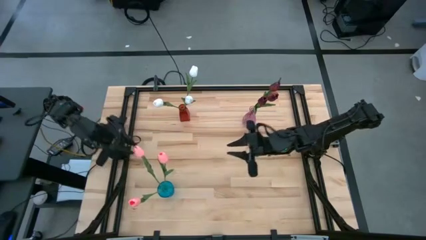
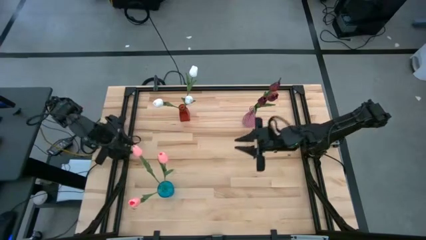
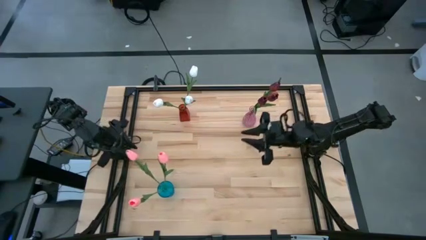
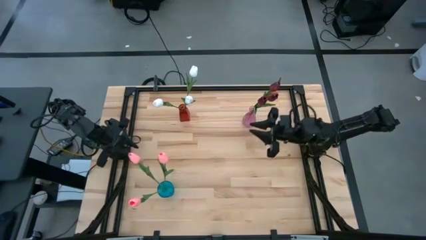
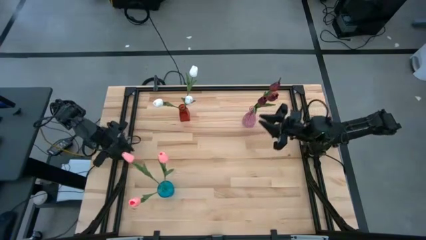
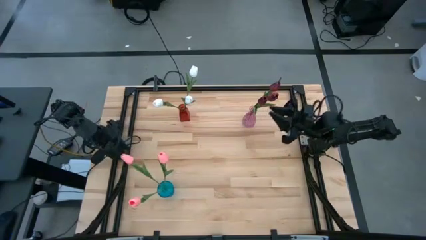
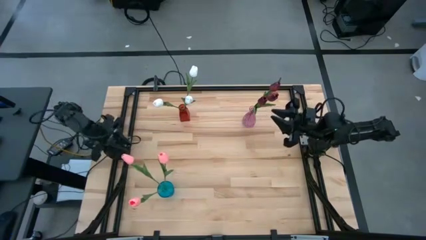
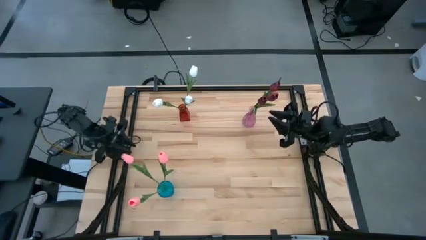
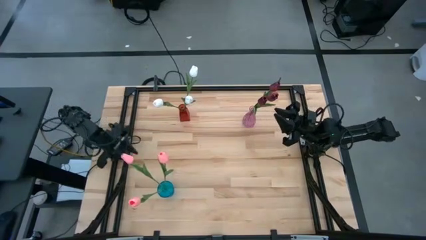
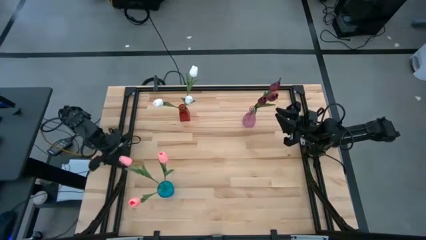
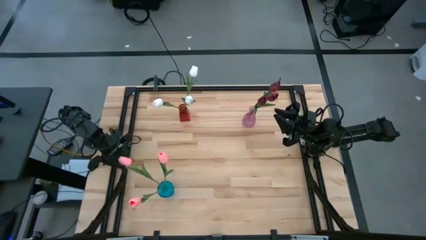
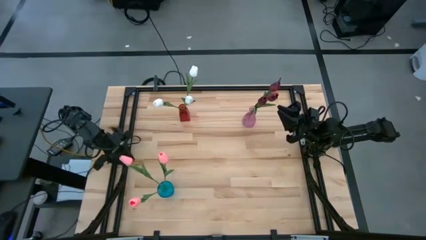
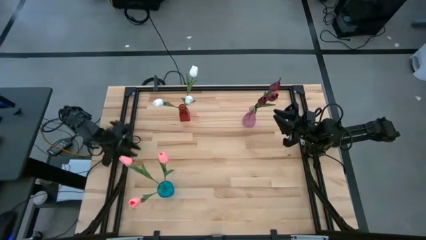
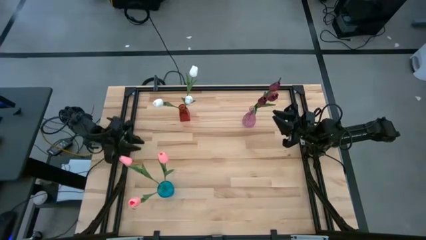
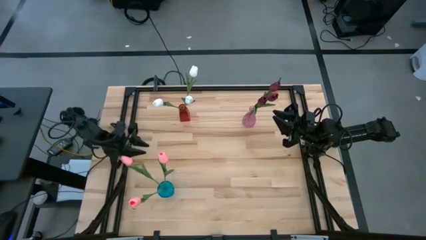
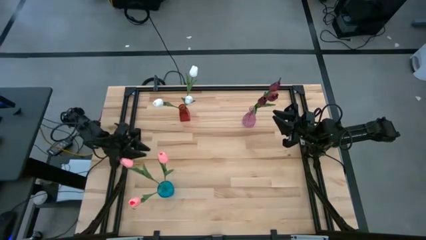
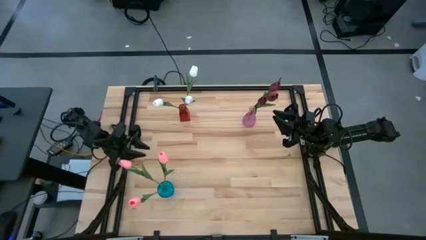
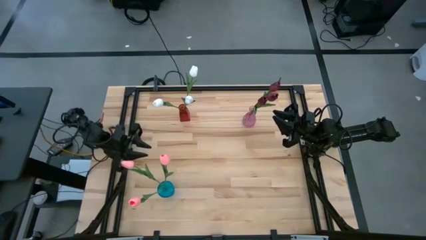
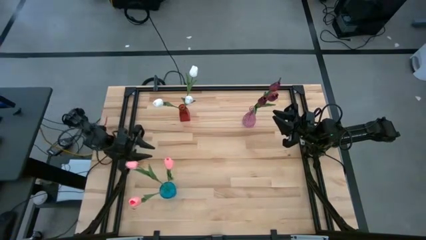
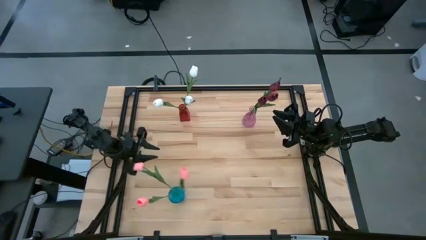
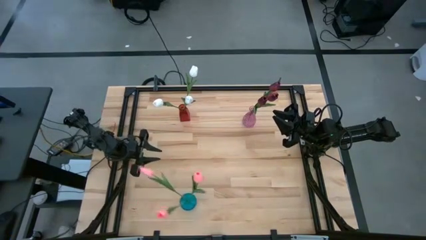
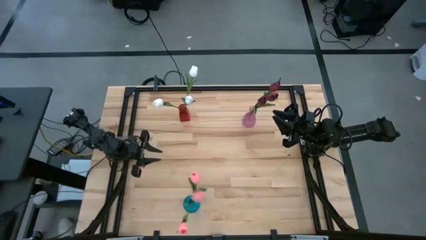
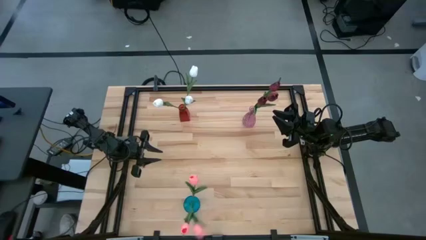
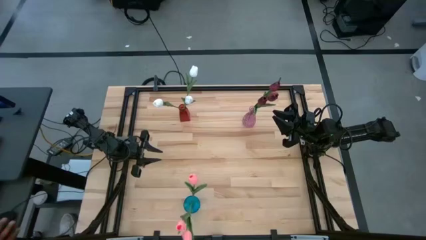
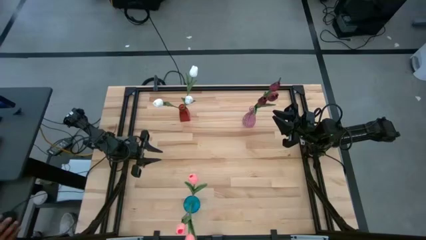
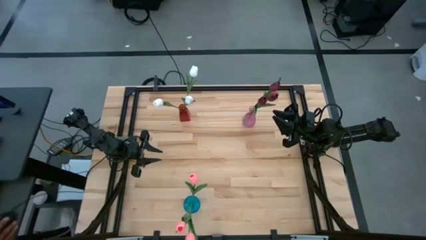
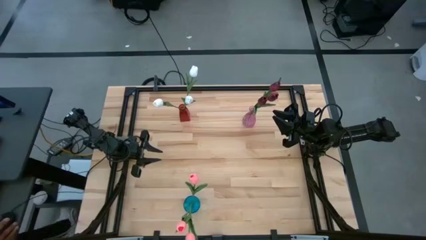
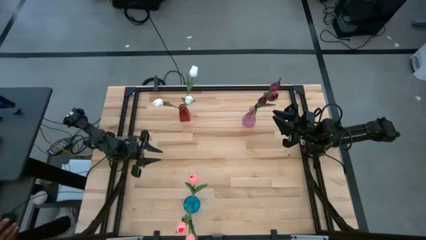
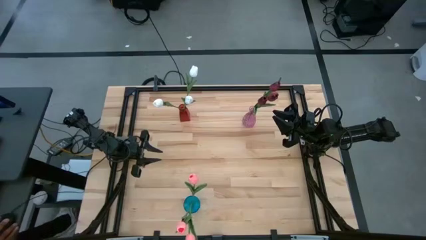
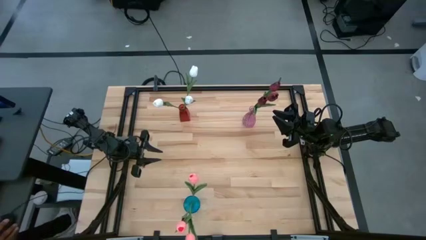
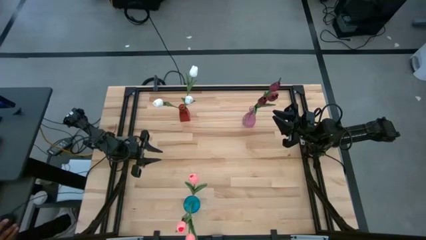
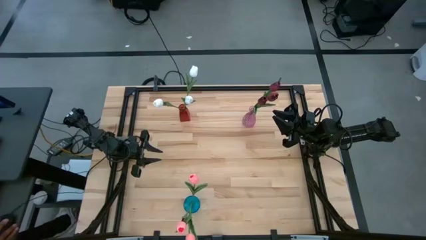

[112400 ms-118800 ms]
Task: Sort flowers into vase by color
Return to Home Position

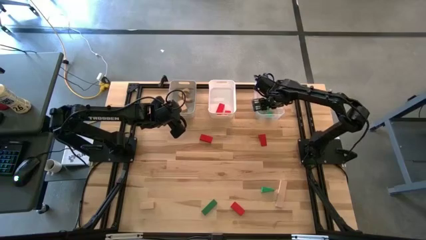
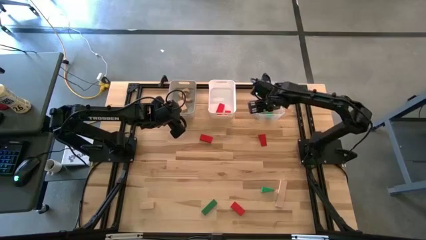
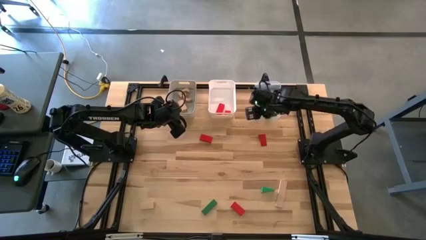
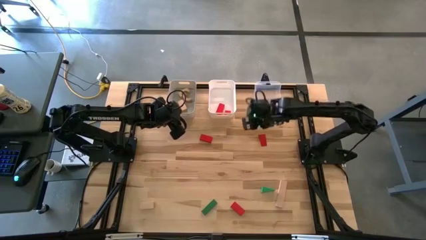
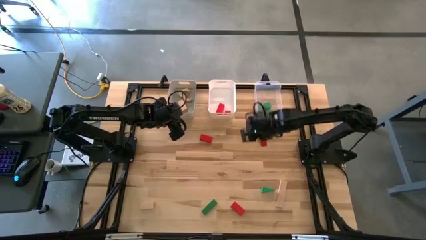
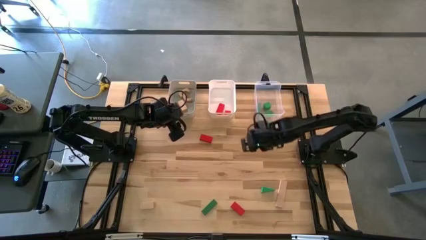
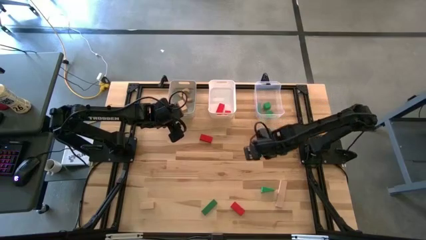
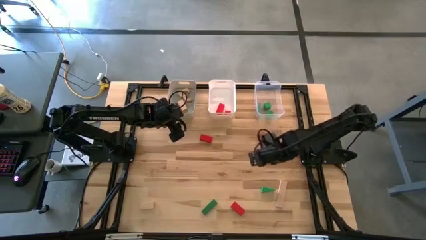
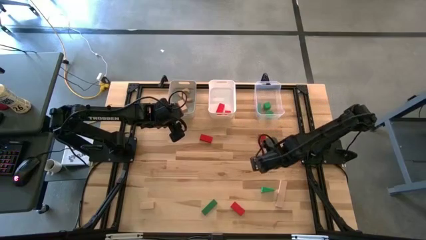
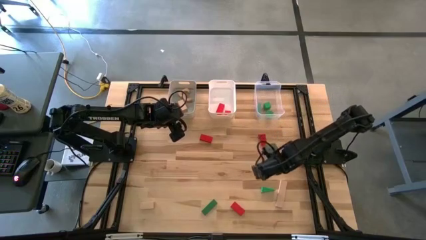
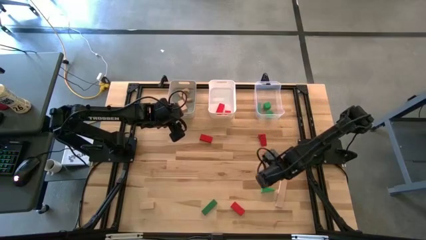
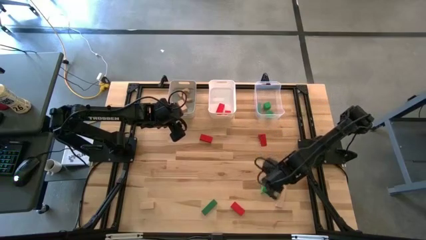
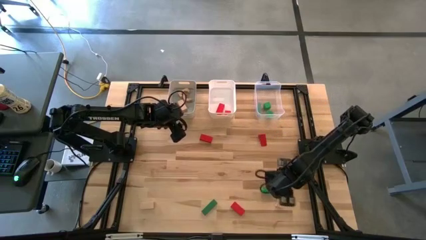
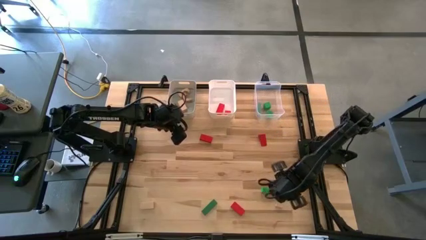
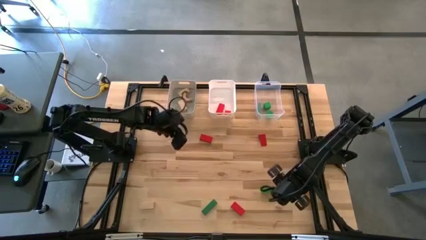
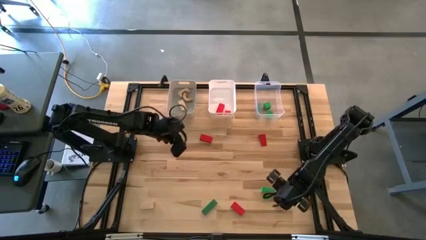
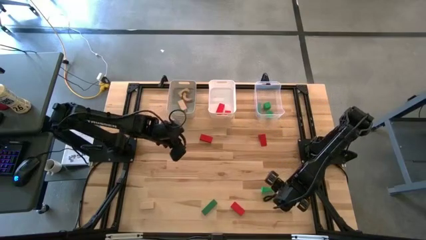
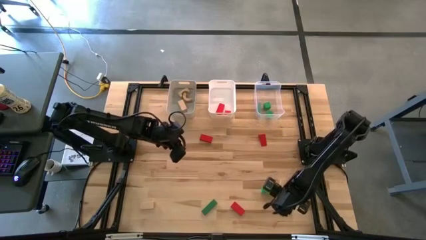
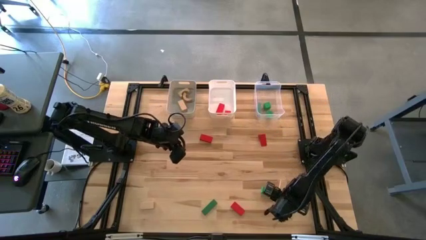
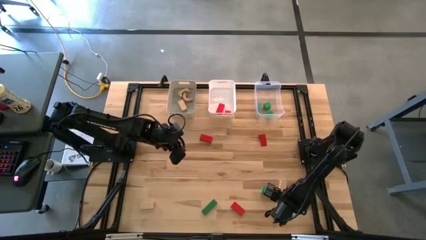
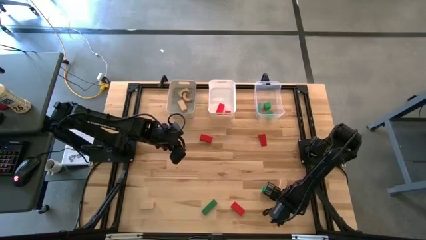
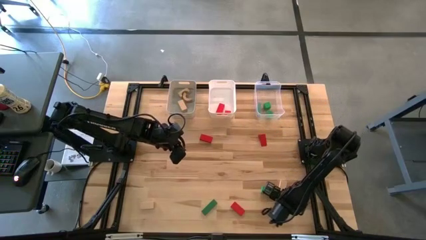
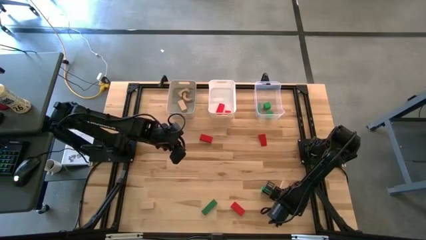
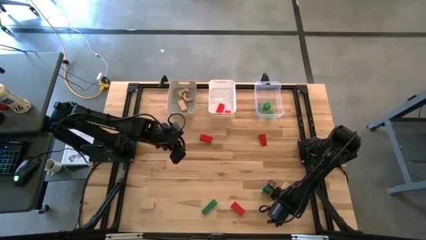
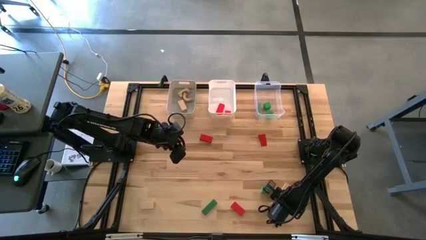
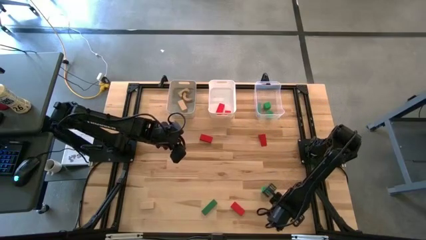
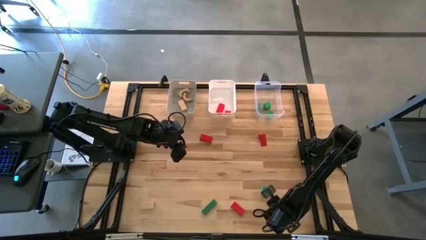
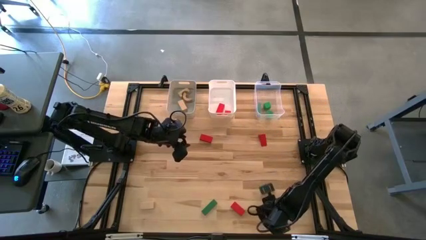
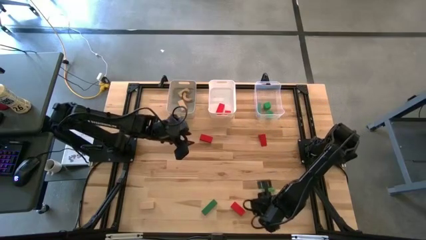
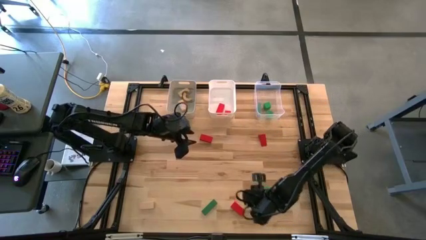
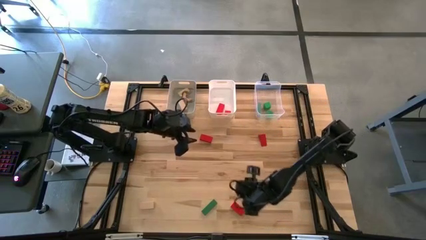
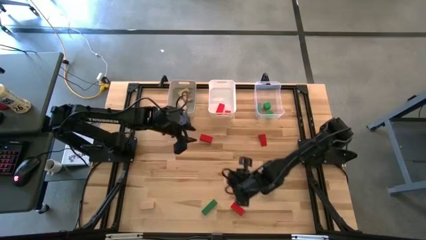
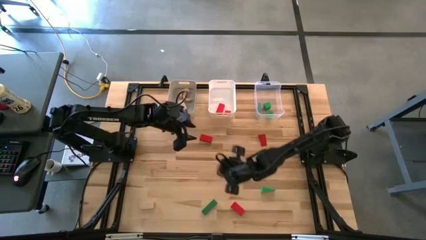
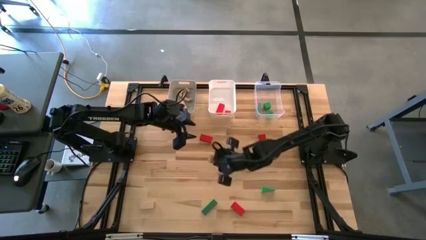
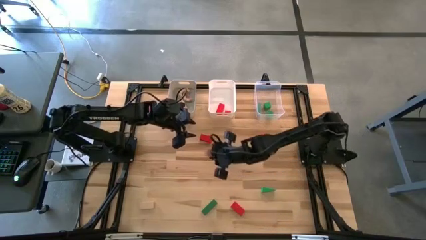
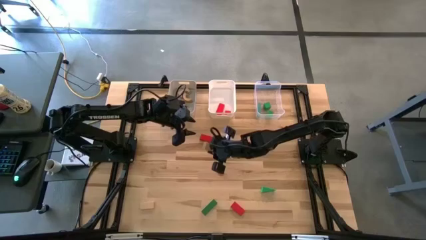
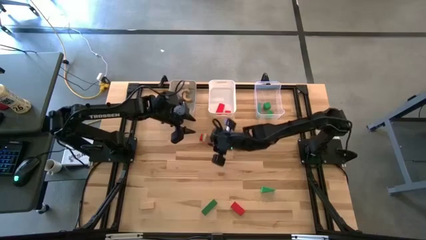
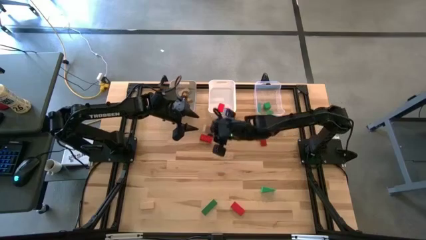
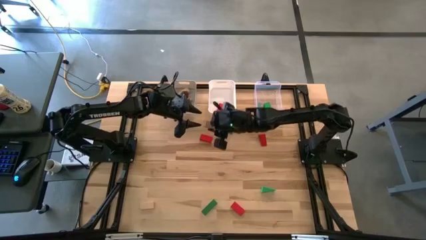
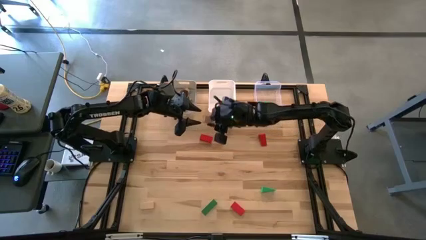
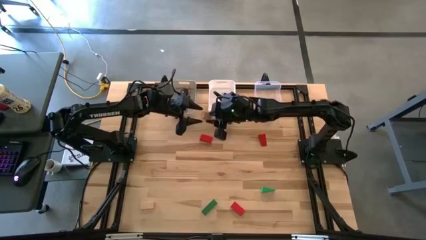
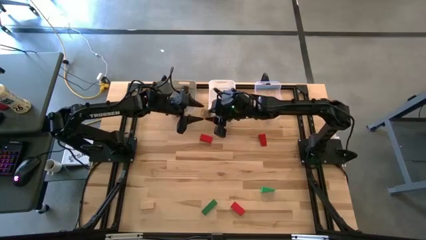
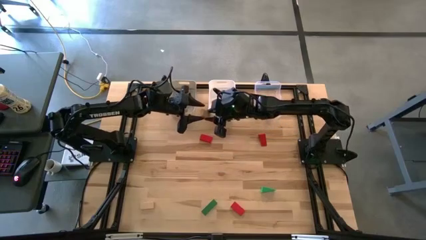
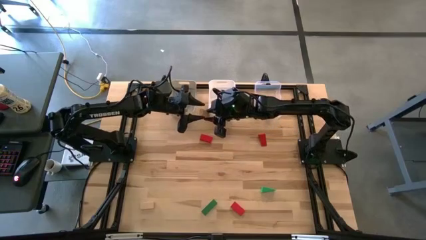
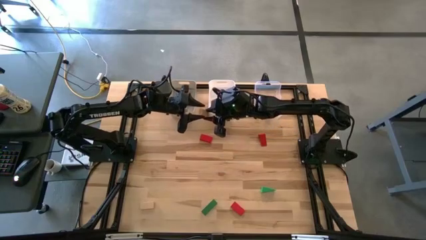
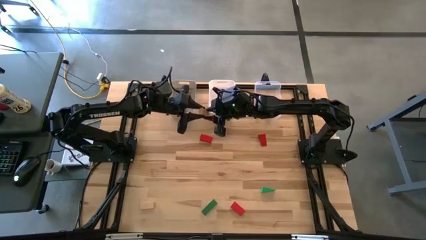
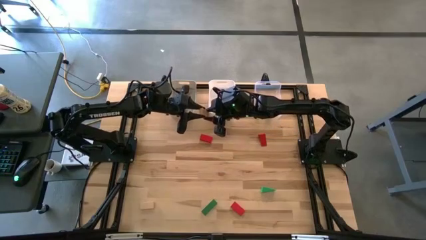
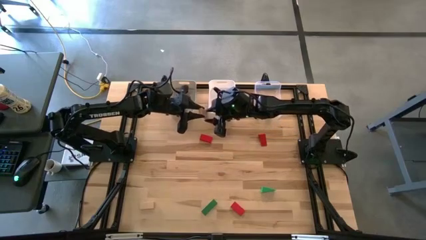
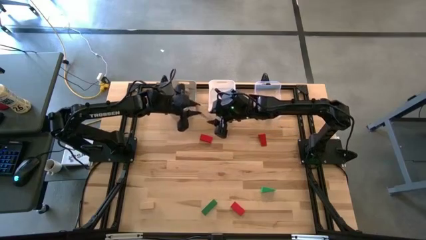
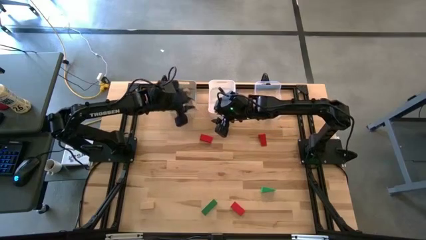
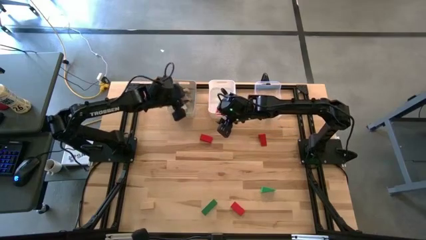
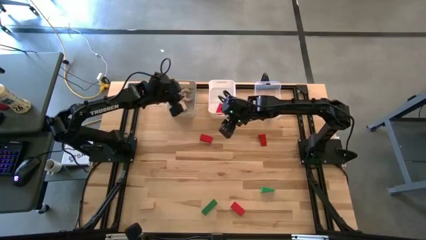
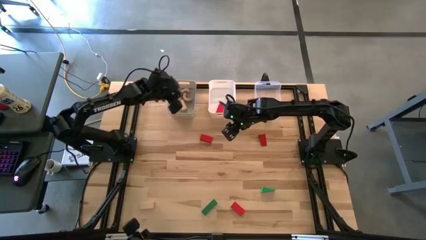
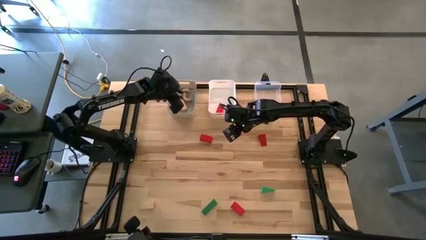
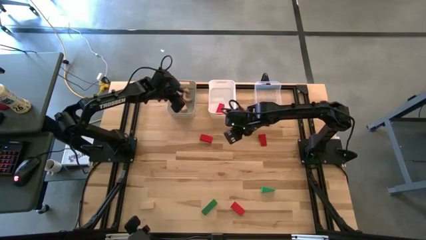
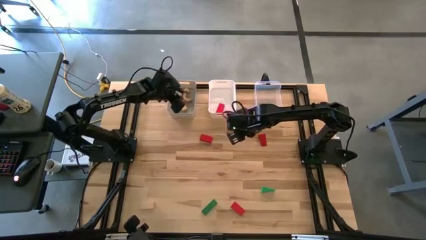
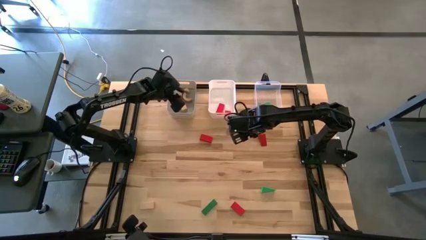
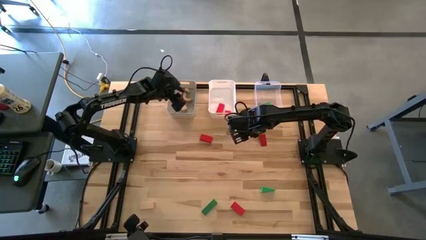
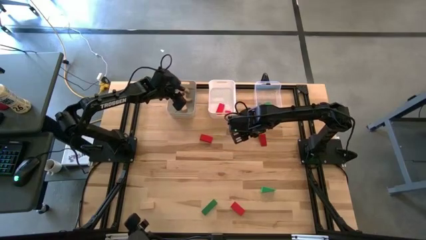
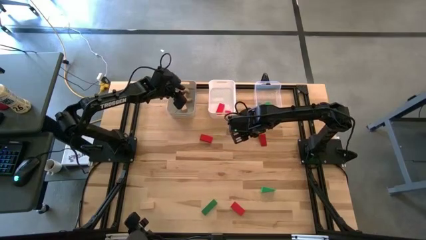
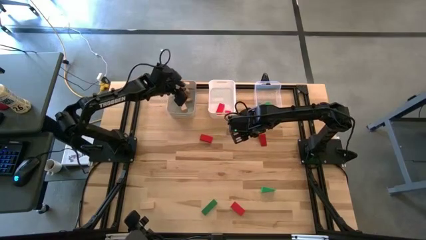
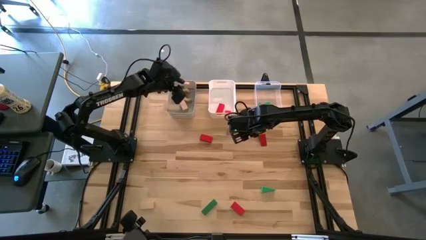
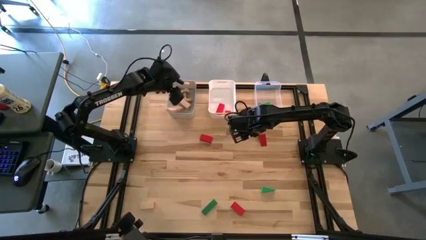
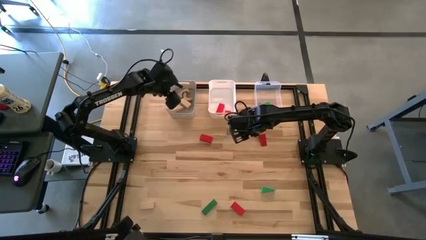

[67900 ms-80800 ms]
Task: Sort & place blocks by color
Put the right brown block into the gray bin
